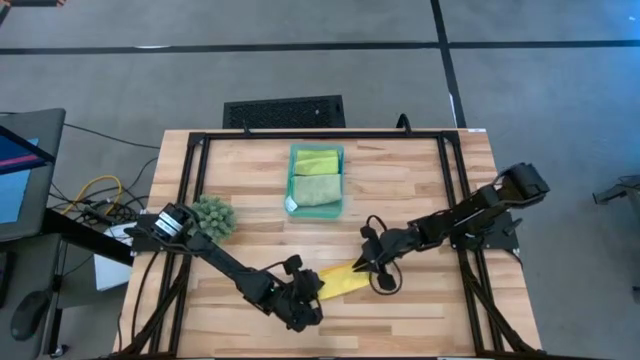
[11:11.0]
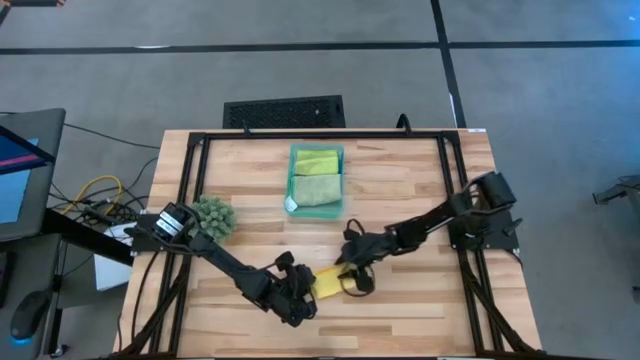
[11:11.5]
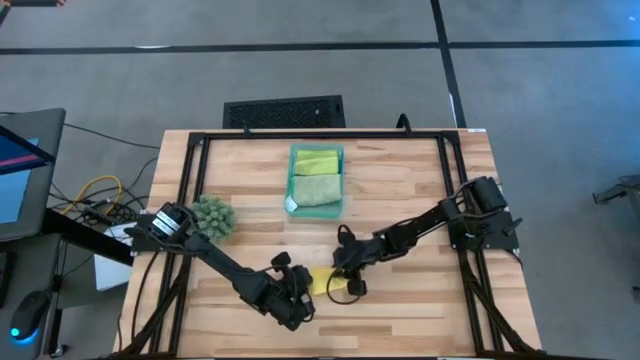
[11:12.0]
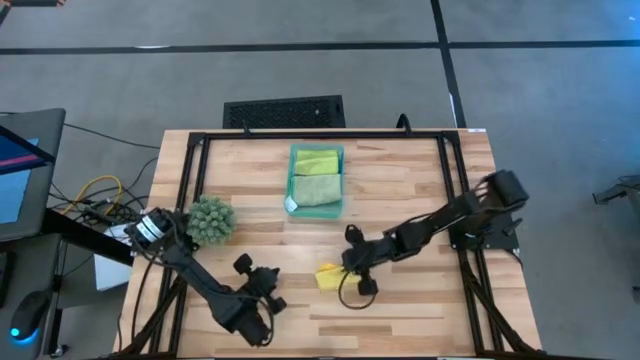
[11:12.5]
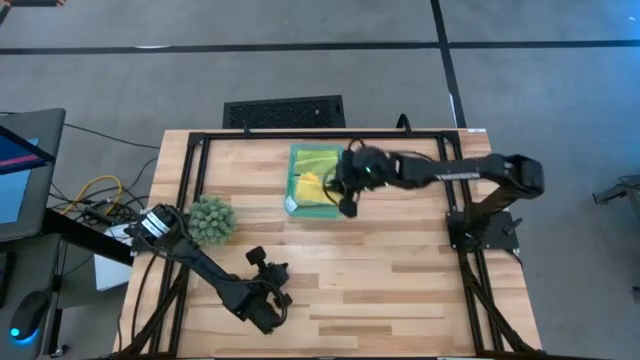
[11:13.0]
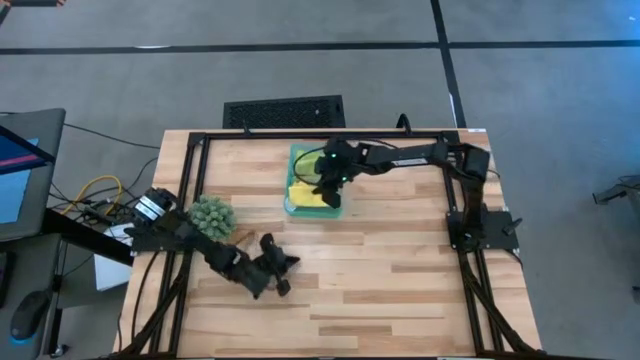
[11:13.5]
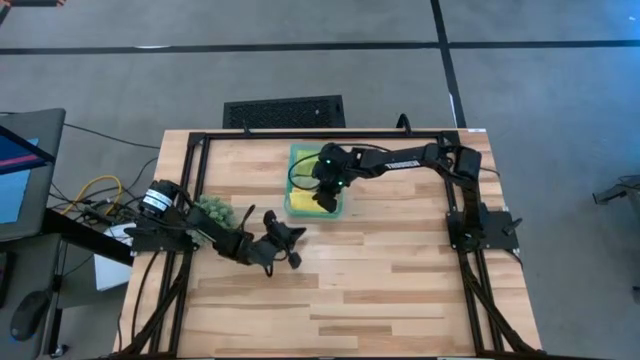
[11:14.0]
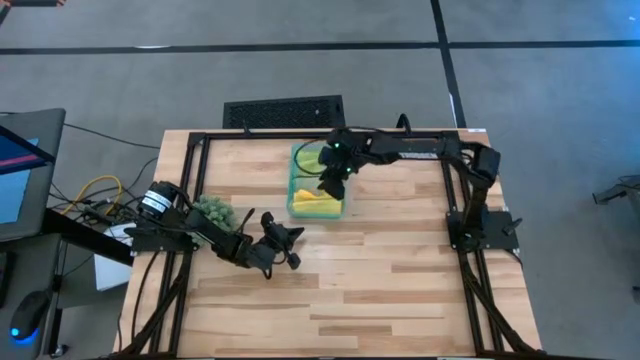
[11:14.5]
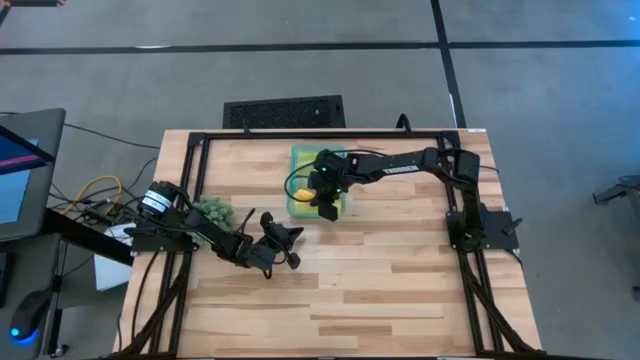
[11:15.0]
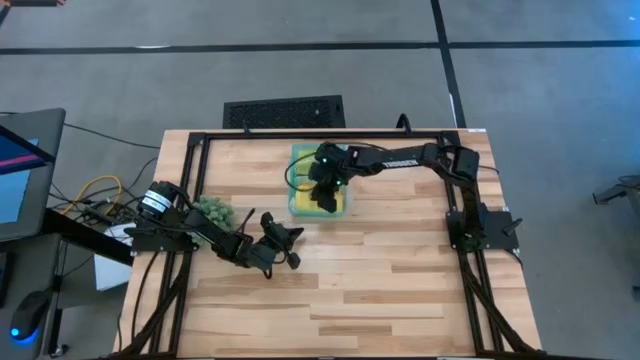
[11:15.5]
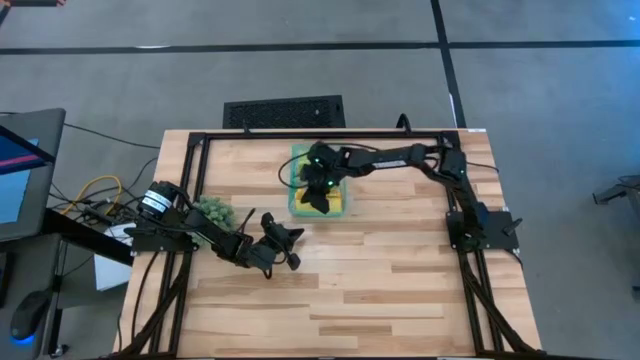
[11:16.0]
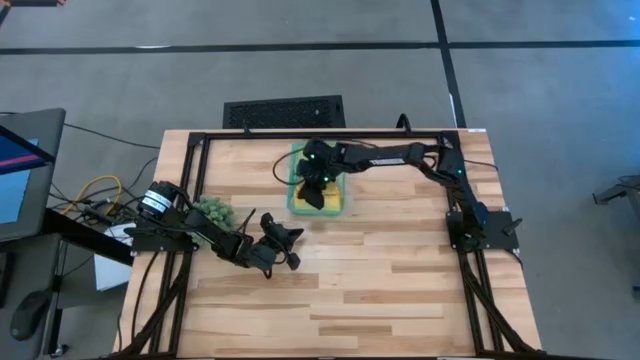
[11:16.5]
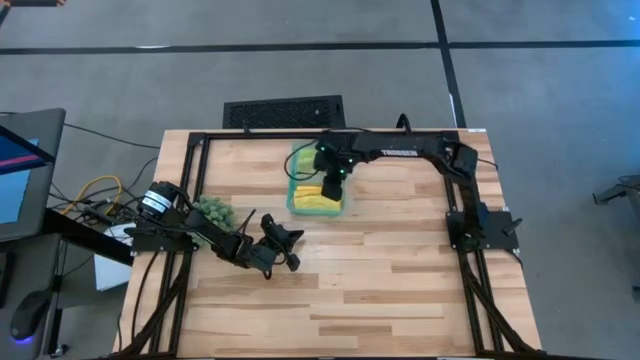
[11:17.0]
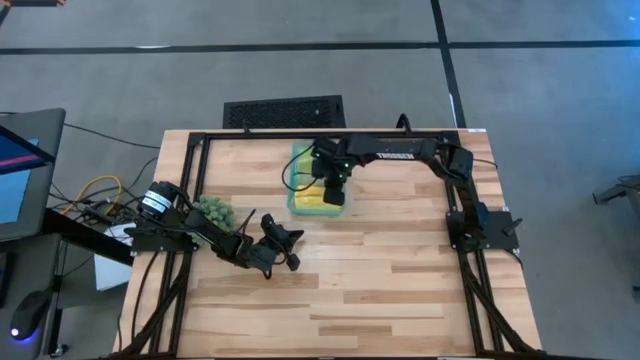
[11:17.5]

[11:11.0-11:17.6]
Task: Fold microfiber towels
Stack the folded yellow microfiber cloth on top of the folded green microfiber cloth in the green bin

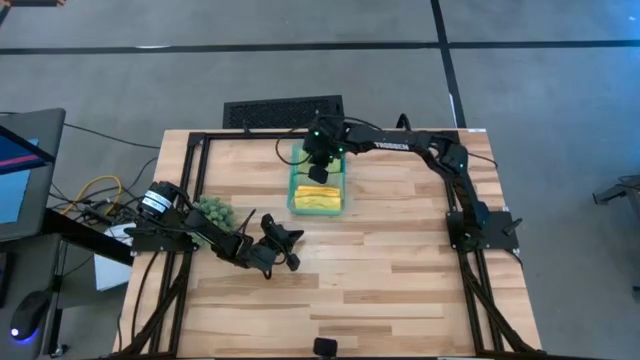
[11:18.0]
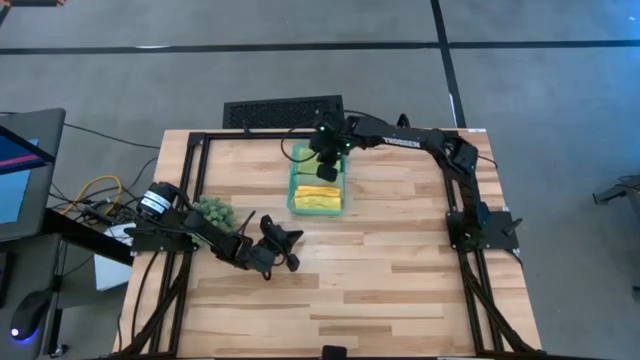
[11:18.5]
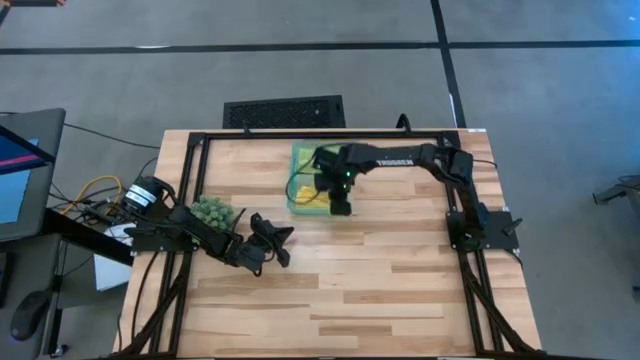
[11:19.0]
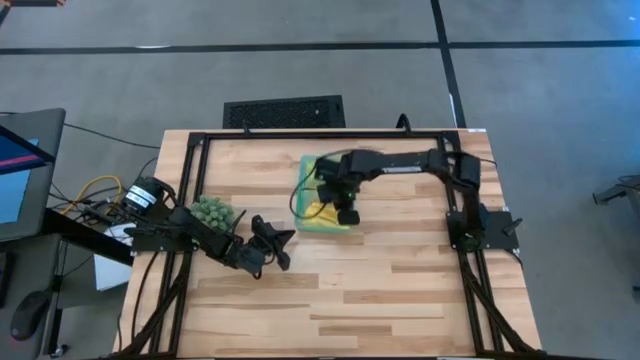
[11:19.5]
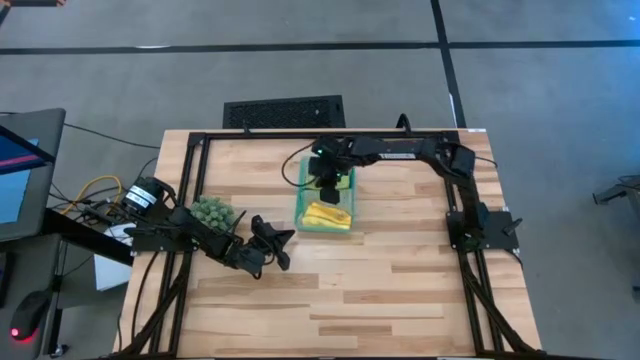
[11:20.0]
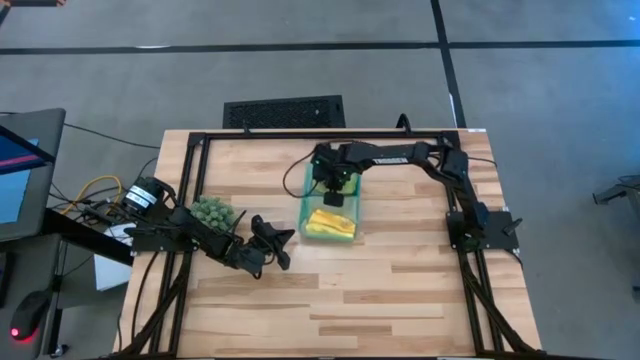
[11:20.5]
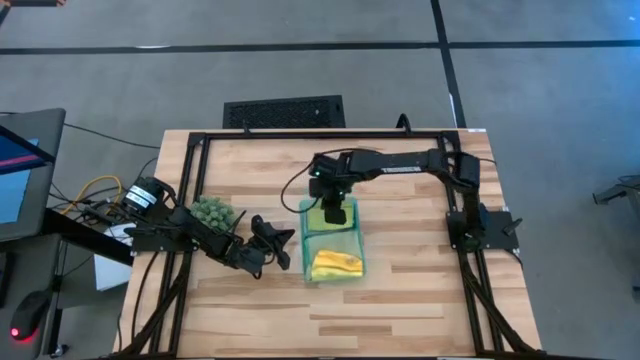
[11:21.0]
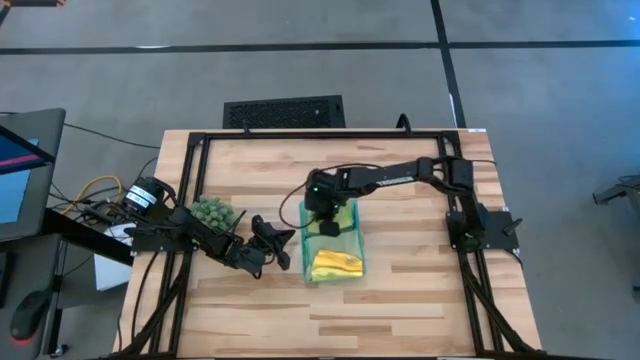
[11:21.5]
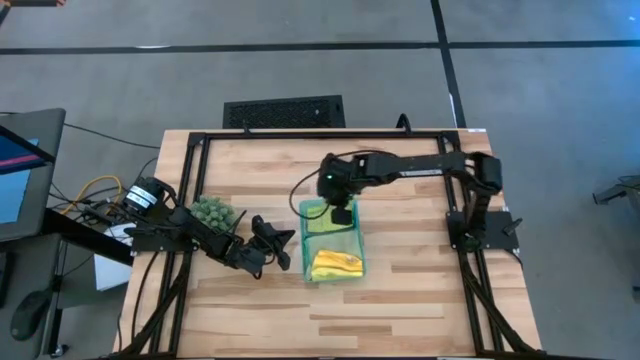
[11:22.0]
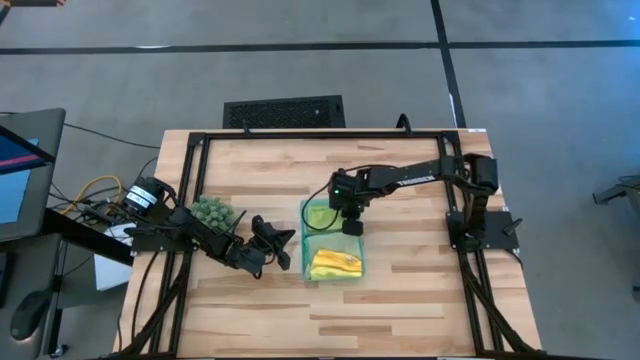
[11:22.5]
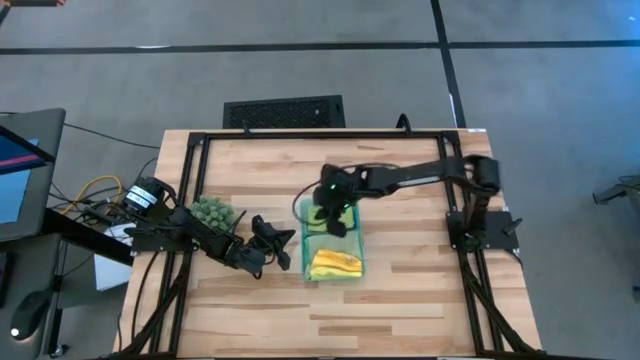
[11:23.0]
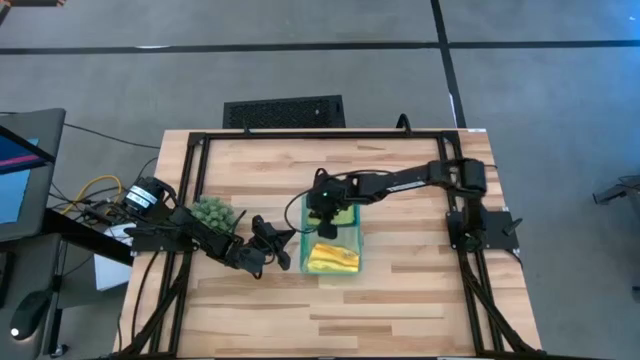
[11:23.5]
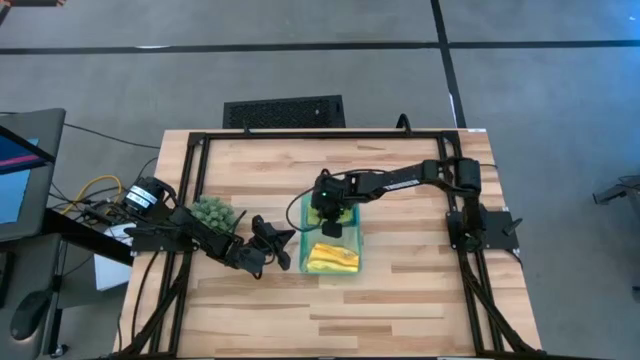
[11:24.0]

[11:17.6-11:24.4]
Adjust the microfiber clothes in the green bin

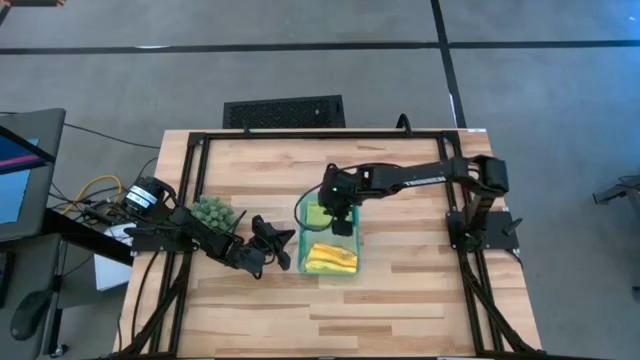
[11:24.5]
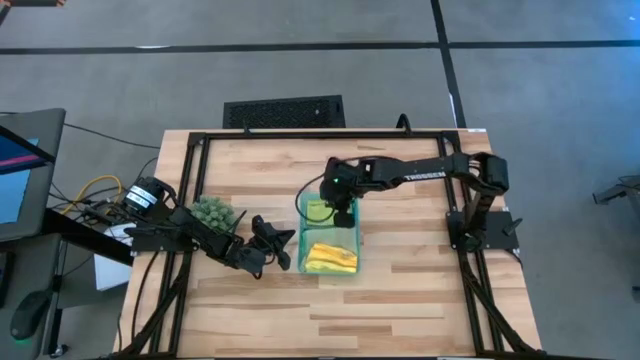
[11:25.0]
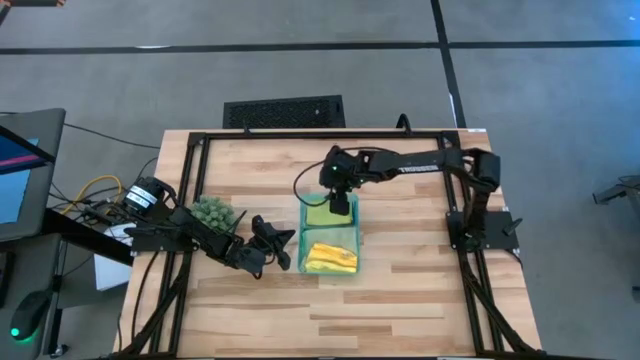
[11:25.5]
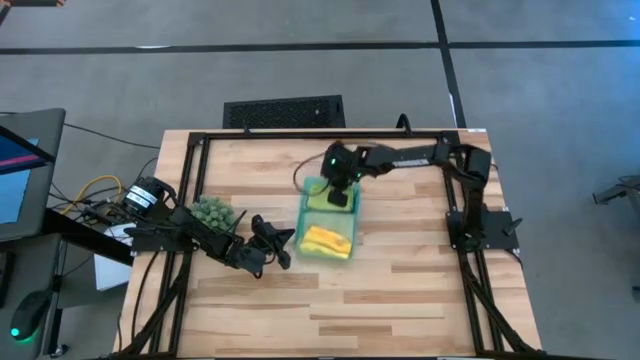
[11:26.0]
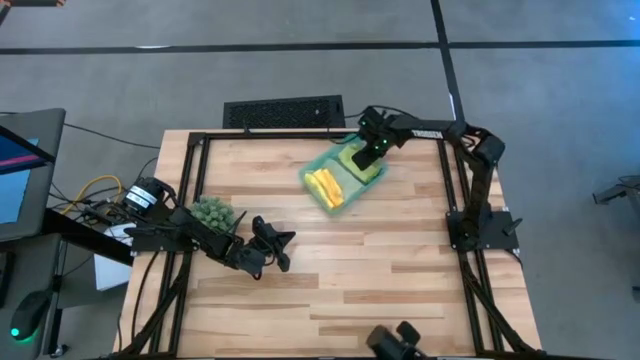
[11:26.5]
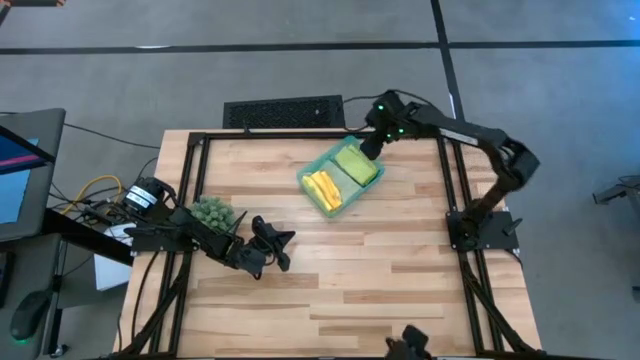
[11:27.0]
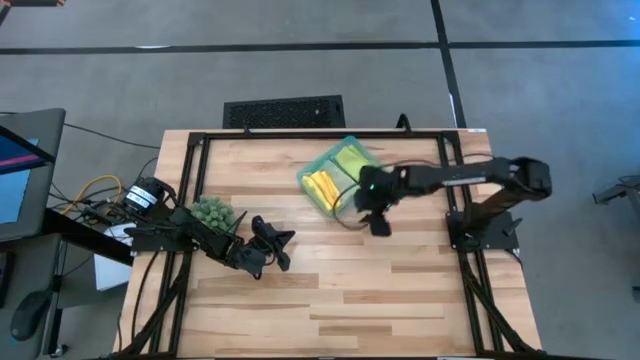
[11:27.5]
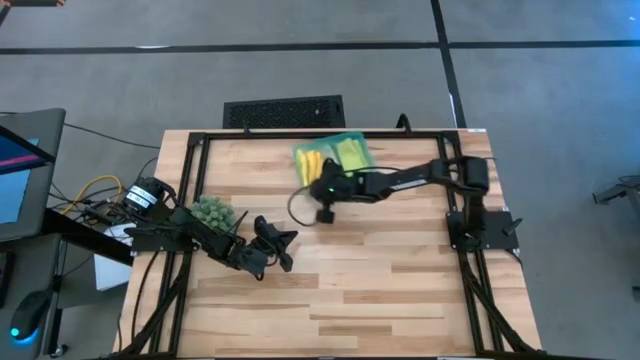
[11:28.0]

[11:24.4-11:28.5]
Adjust the green bin
